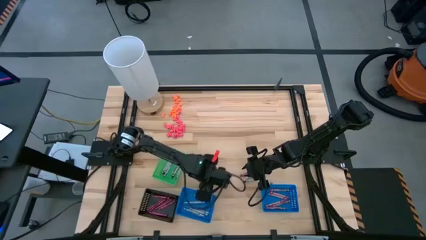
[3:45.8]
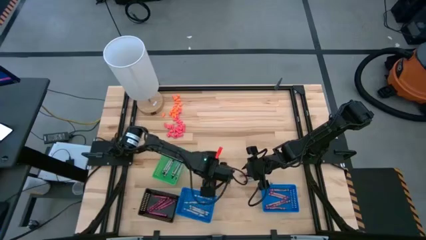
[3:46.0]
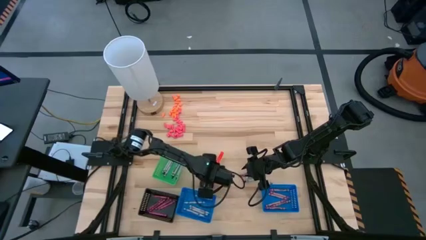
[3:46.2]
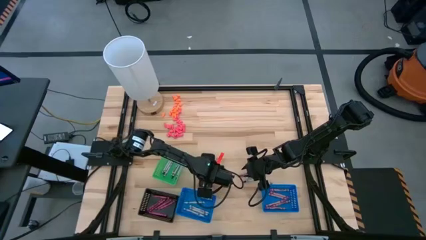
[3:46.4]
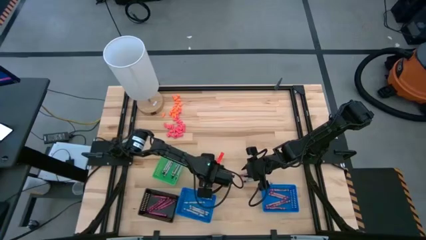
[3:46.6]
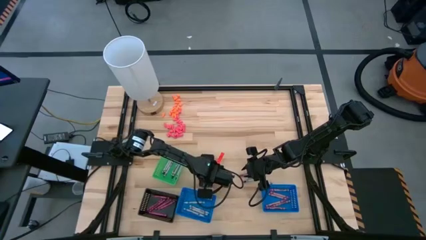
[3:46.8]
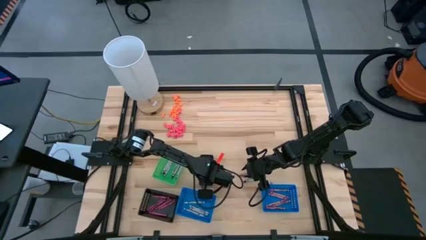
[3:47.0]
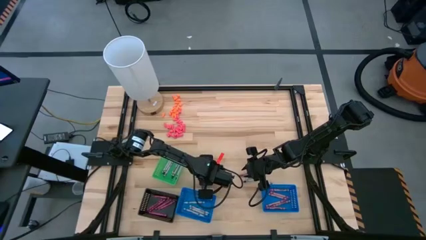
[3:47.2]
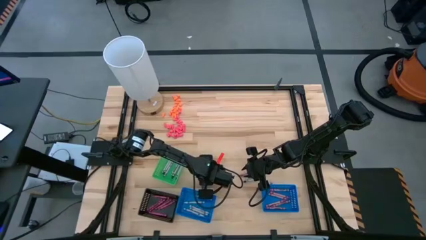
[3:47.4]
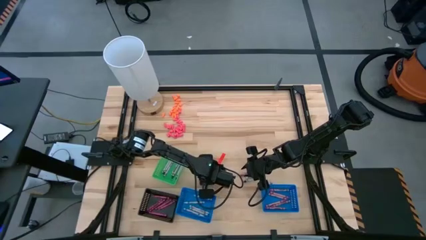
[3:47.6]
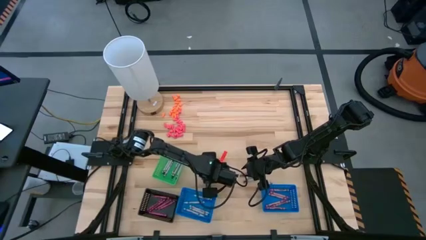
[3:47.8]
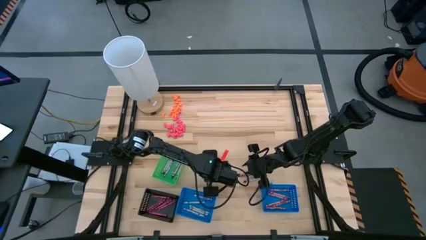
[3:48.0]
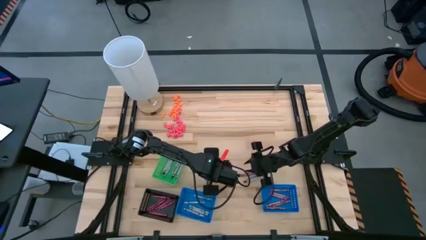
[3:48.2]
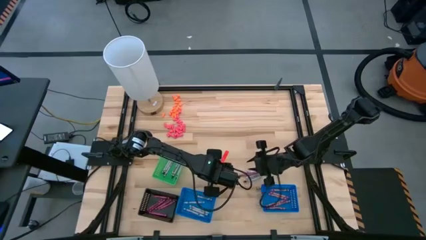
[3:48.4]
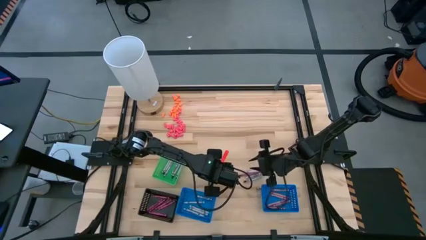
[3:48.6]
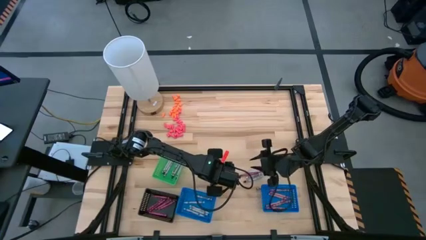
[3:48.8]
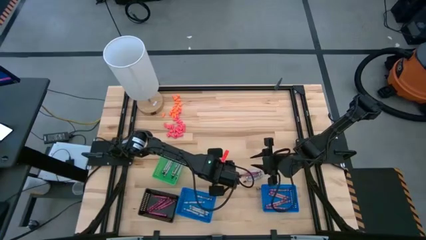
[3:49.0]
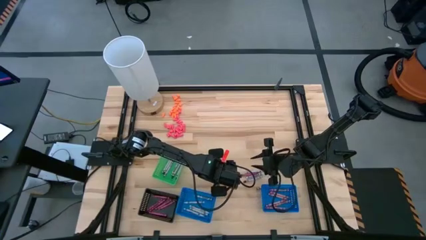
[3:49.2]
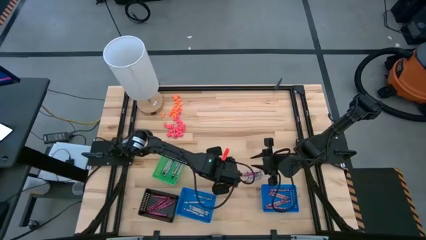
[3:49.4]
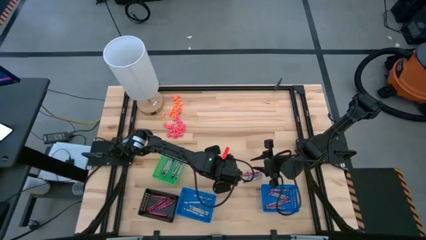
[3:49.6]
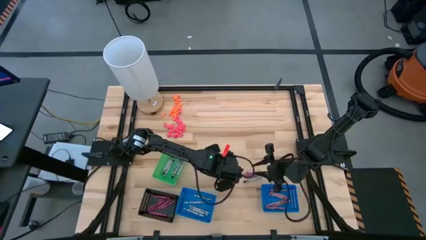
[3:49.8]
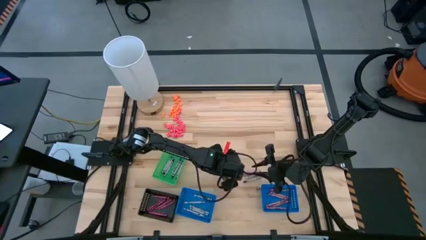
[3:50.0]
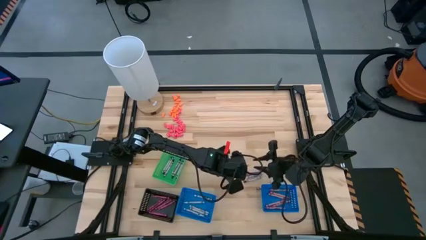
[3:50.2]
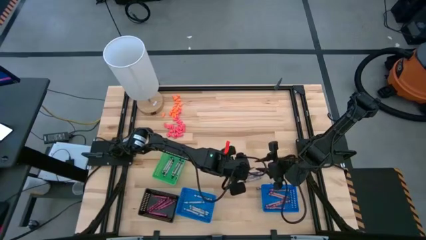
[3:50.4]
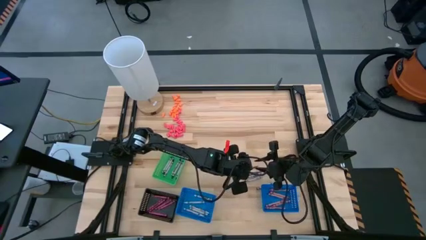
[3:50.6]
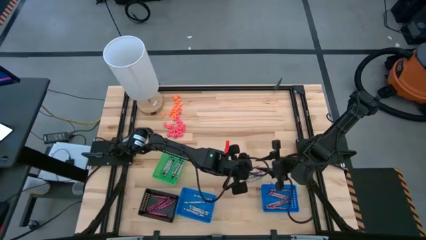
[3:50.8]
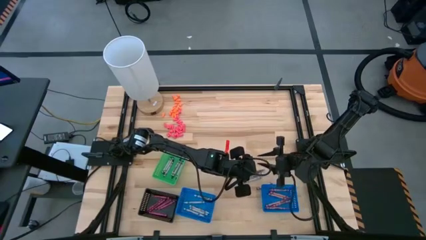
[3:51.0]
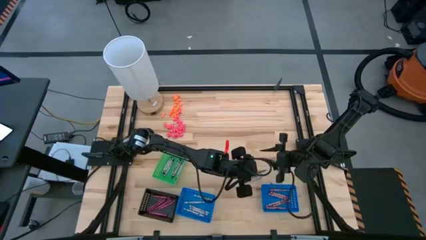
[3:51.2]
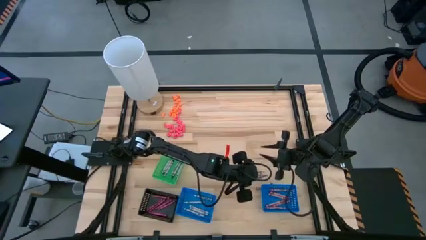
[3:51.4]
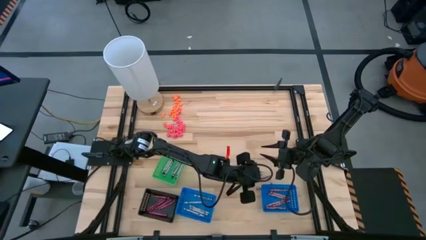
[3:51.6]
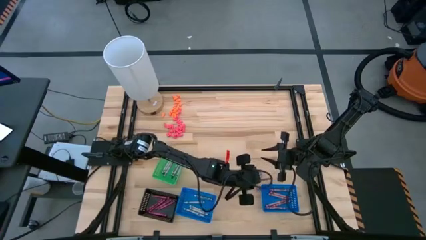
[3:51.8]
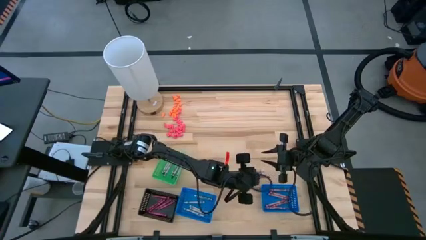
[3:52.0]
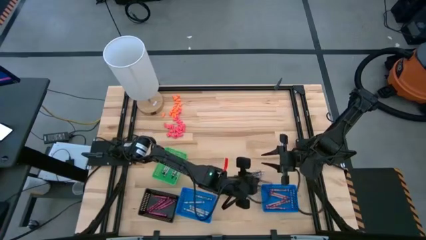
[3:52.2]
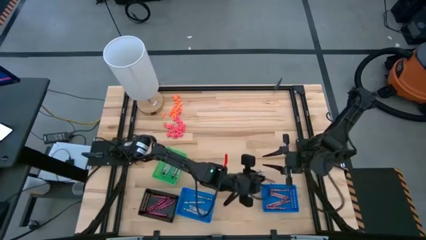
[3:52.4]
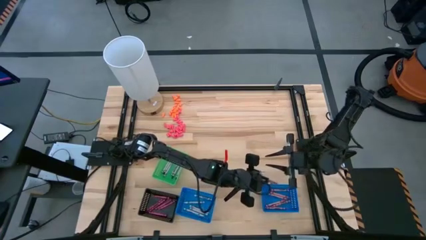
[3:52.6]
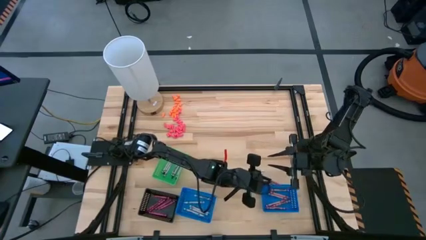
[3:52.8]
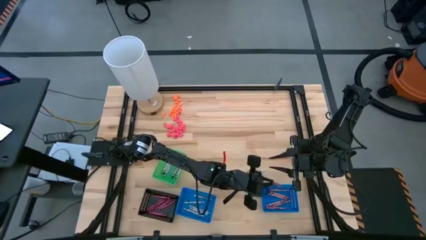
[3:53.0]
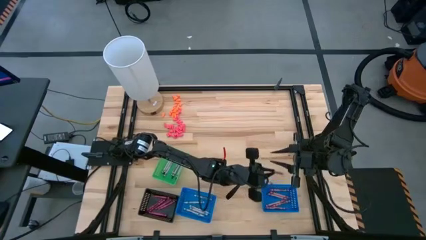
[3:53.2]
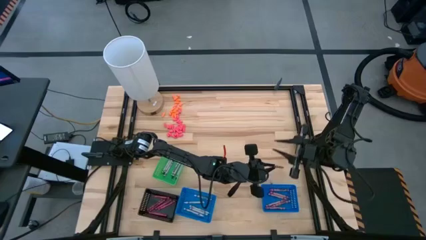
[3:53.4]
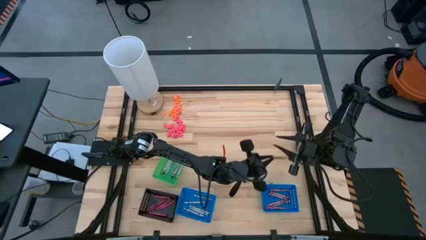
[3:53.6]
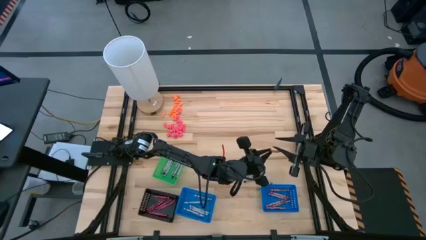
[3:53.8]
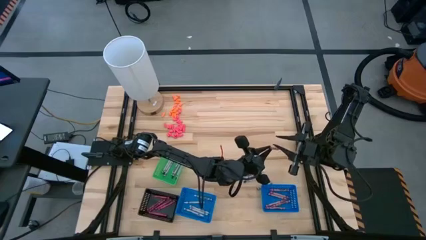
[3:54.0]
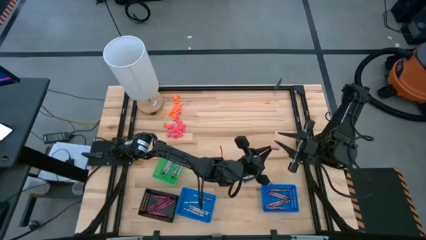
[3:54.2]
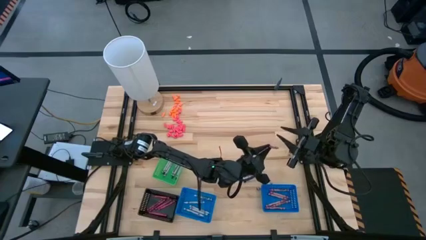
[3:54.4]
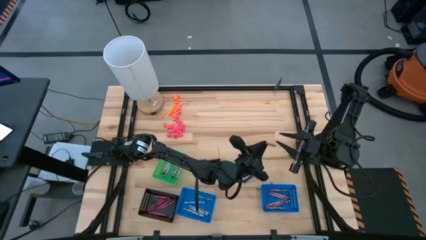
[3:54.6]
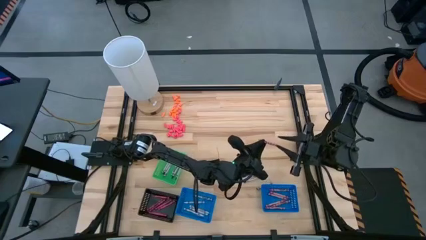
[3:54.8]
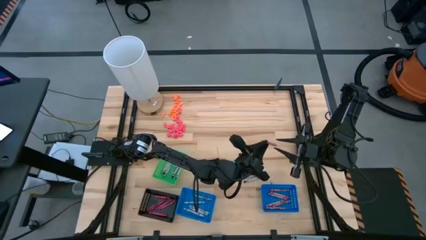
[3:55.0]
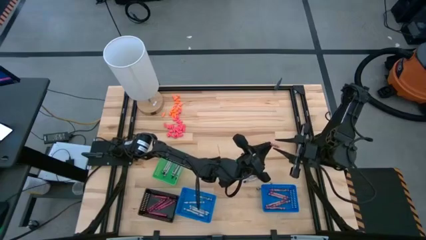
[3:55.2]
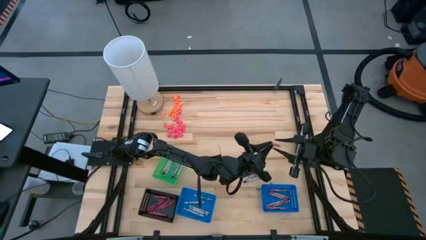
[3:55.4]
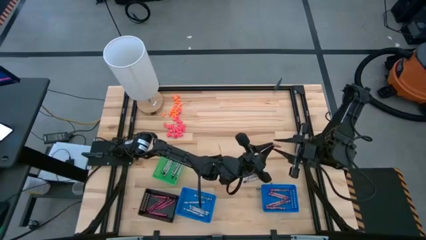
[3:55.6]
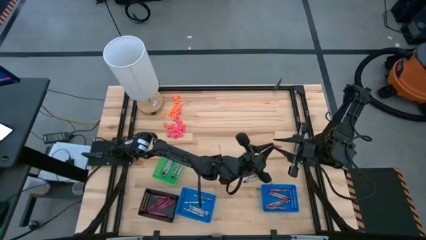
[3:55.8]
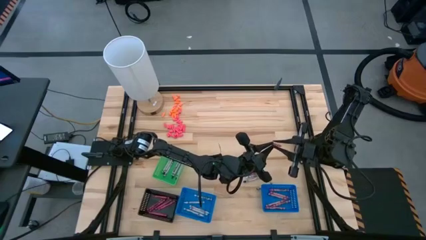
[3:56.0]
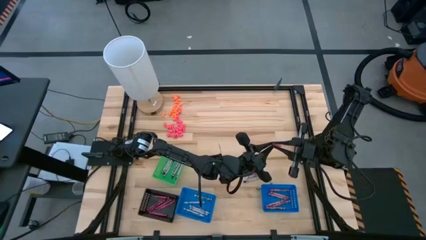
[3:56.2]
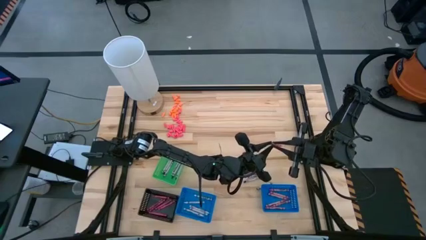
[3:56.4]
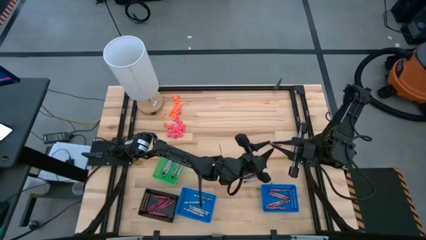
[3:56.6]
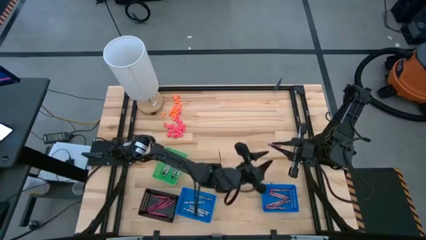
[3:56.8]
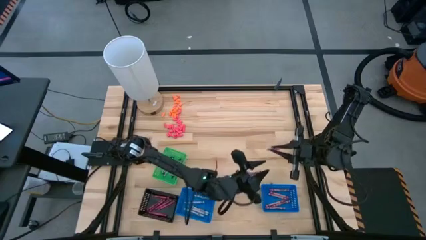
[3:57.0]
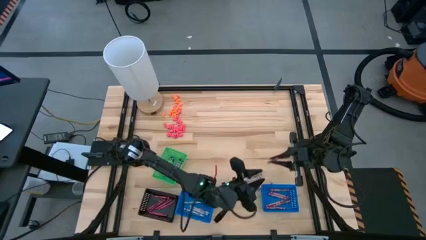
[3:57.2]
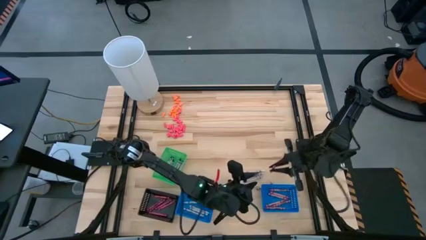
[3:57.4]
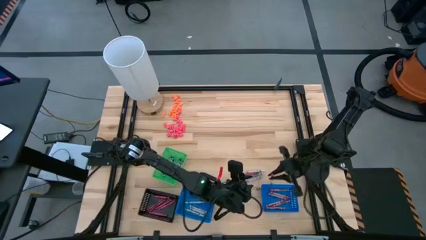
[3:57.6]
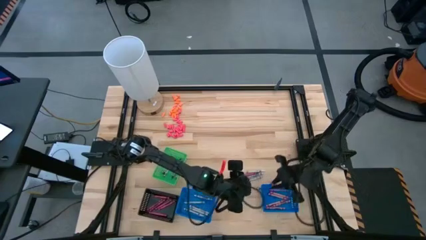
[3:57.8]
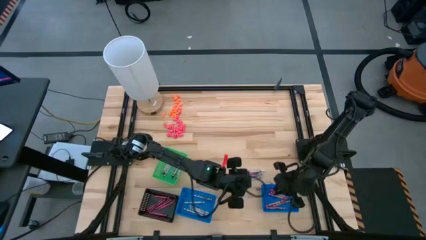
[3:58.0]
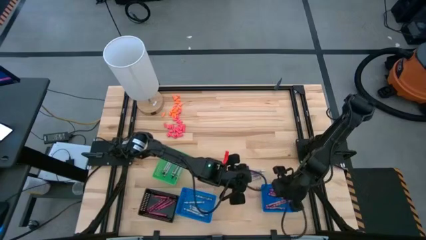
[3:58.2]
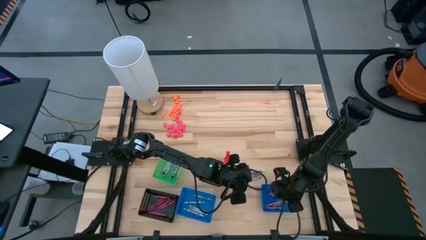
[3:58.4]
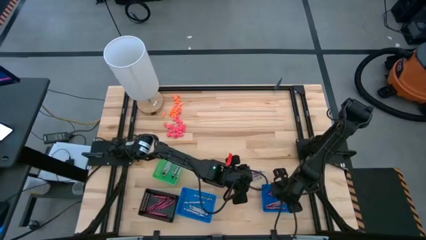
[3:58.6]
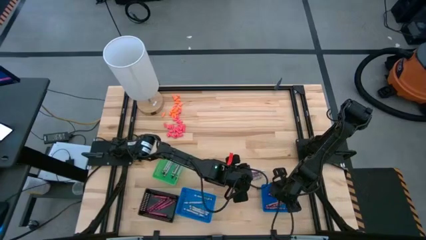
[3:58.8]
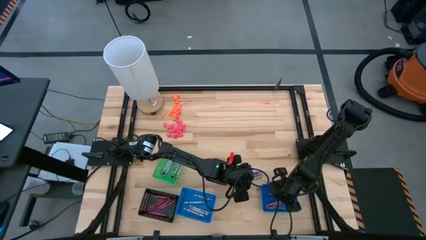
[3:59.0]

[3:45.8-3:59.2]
Task: Sort crayons
Put the pink crayon into the right blue bin
